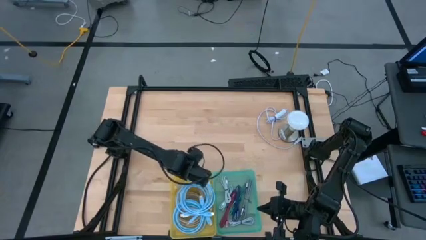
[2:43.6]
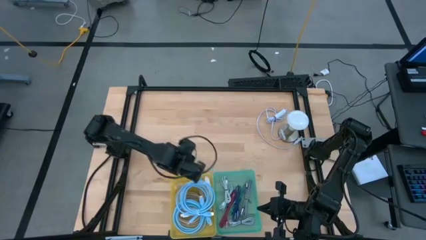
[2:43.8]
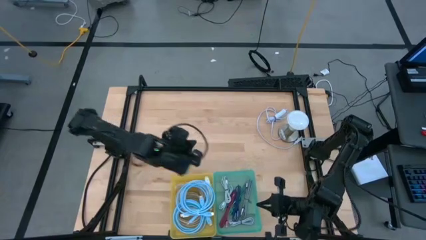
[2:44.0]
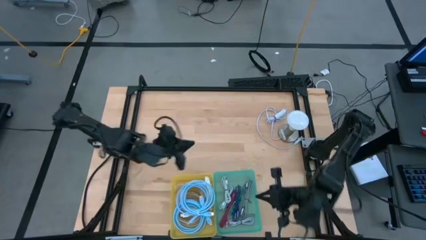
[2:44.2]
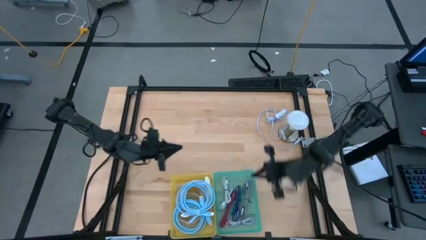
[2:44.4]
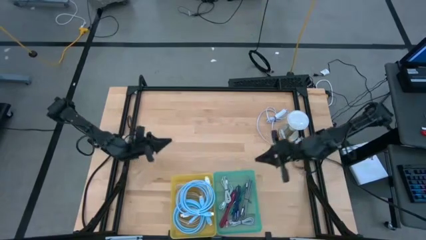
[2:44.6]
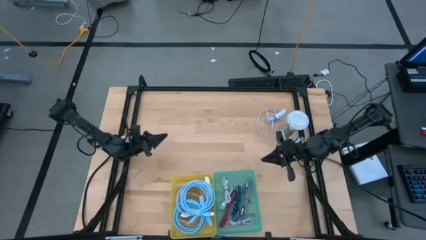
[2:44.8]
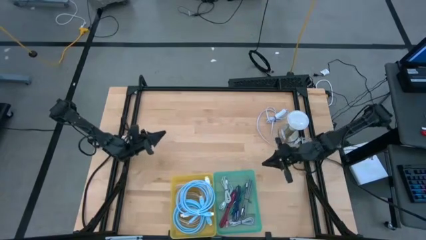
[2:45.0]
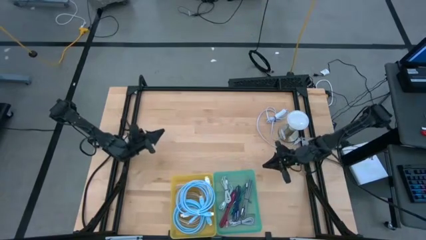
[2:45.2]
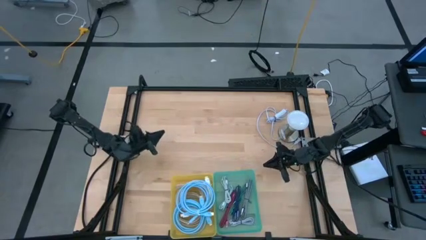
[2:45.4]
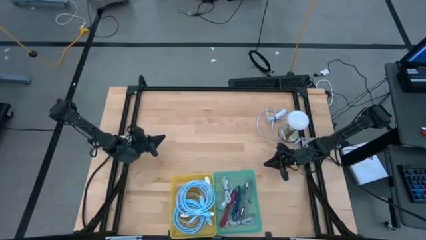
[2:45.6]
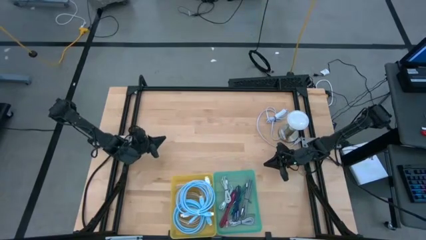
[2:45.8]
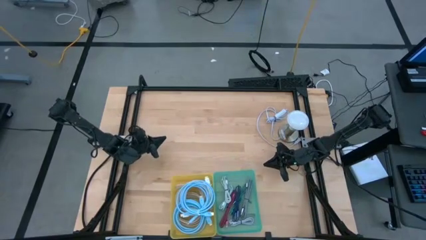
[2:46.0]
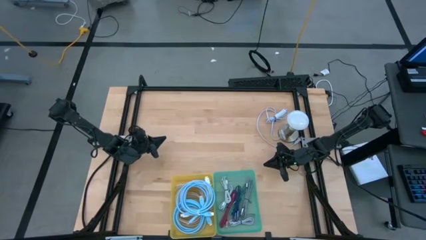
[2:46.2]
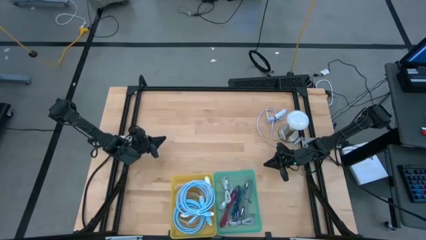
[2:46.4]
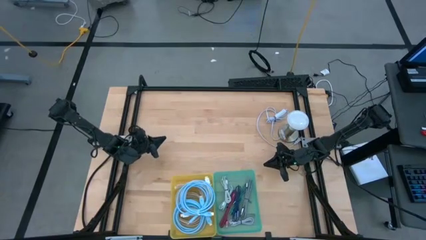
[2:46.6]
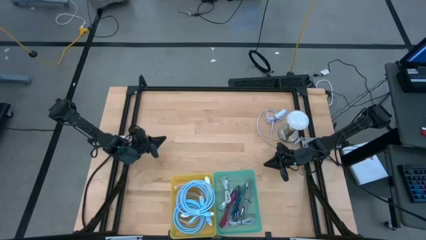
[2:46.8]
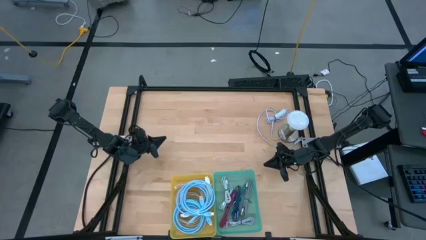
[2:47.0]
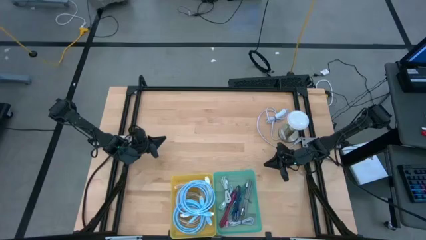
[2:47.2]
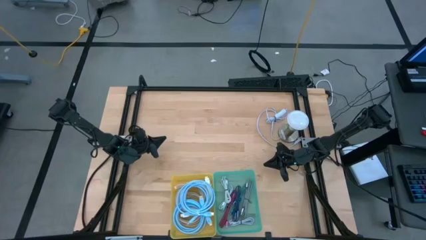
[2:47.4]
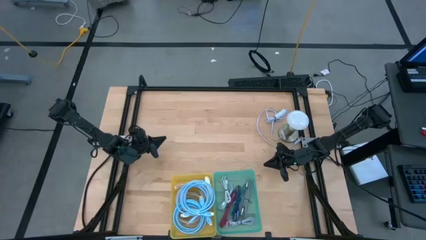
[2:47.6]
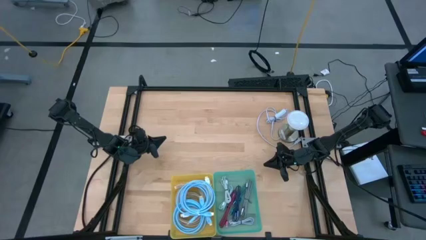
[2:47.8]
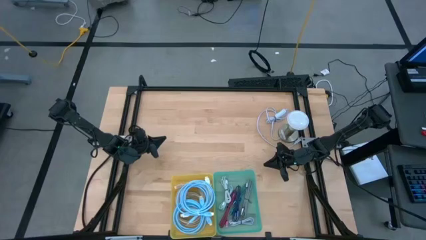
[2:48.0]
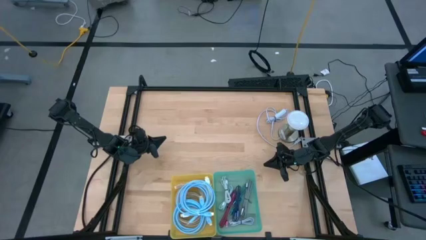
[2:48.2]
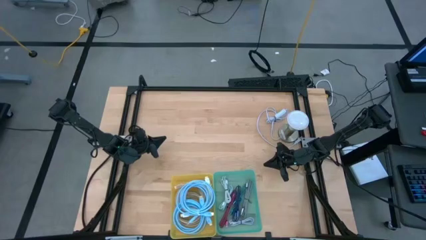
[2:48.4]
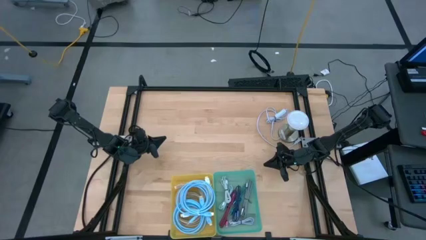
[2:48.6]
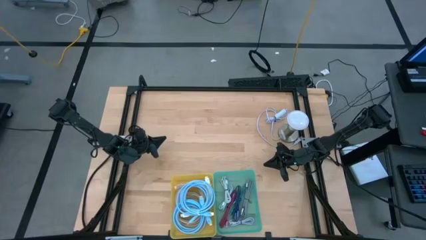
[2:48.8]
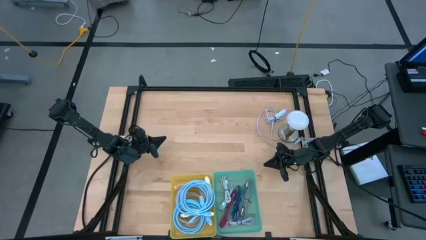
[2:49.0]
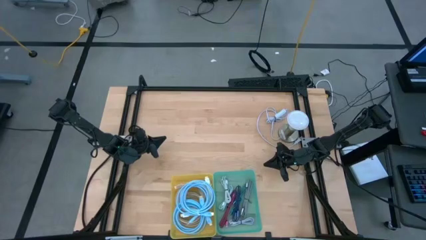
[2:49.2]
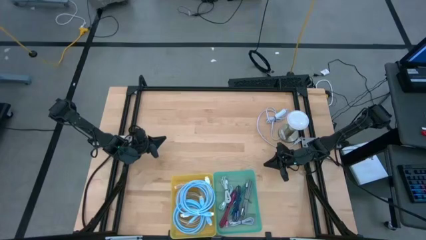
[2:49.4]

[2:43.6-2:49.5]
Task: Pick & Place USB Port
Return to Home Position

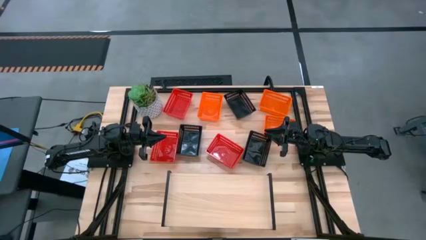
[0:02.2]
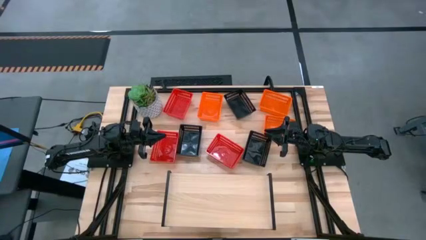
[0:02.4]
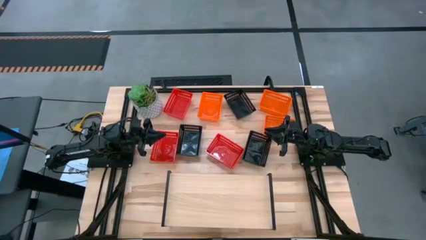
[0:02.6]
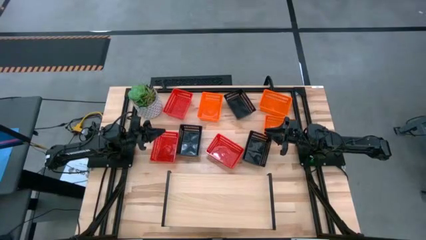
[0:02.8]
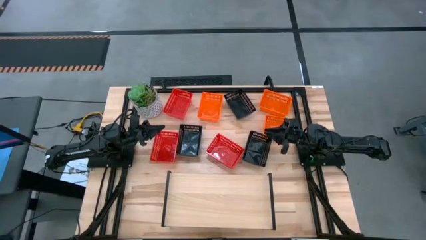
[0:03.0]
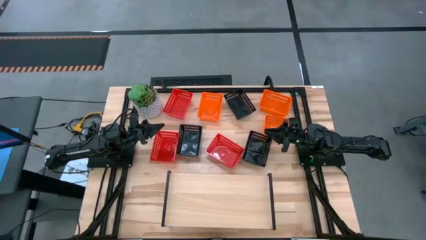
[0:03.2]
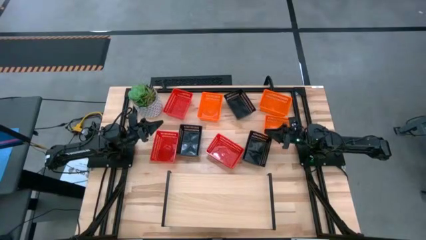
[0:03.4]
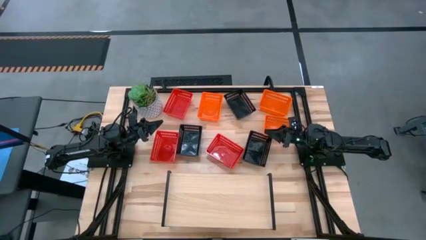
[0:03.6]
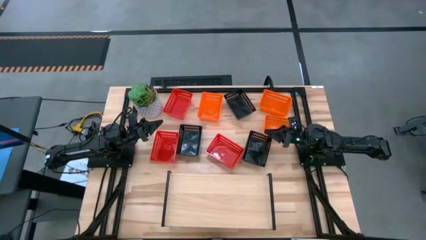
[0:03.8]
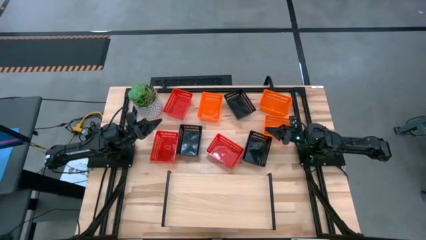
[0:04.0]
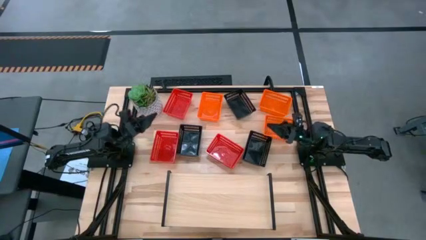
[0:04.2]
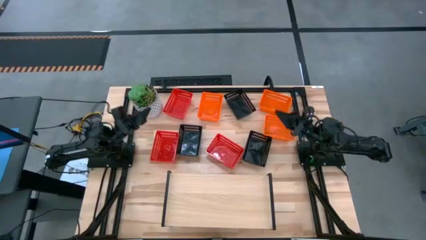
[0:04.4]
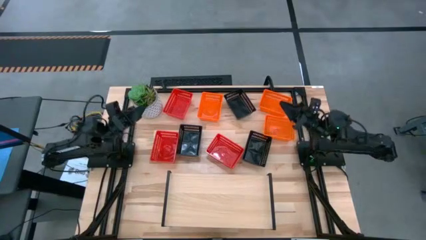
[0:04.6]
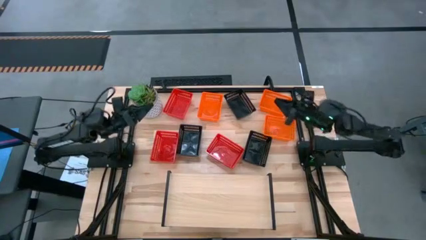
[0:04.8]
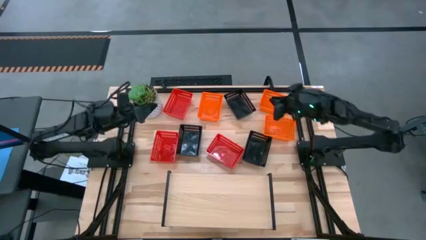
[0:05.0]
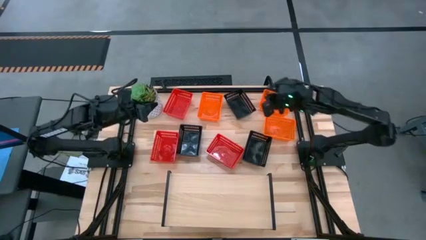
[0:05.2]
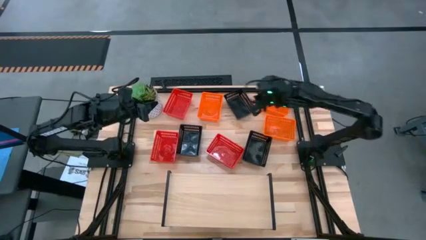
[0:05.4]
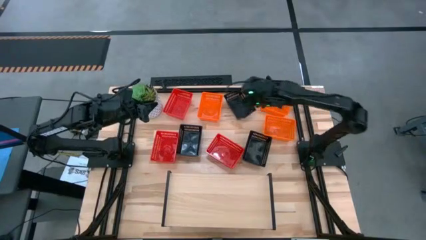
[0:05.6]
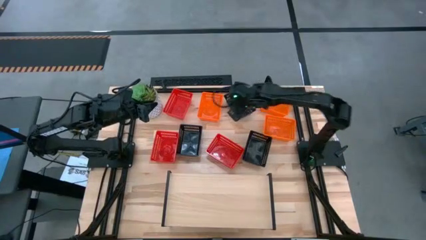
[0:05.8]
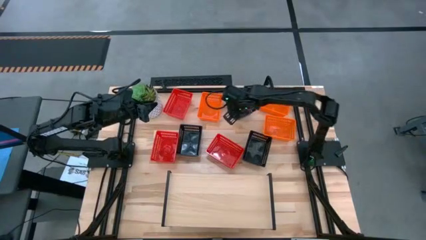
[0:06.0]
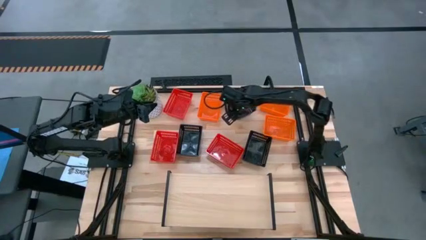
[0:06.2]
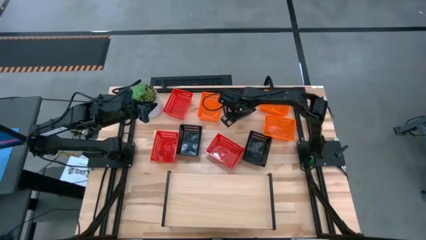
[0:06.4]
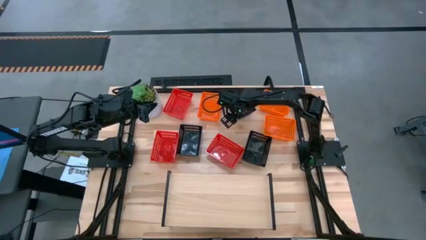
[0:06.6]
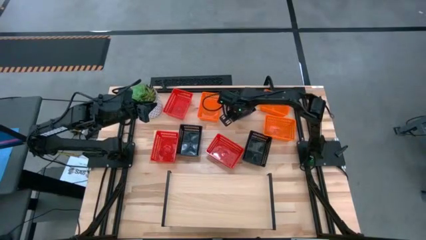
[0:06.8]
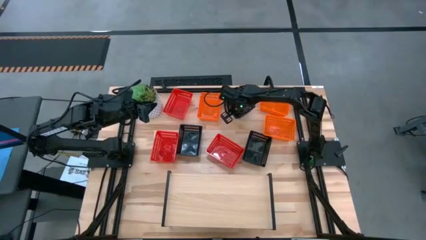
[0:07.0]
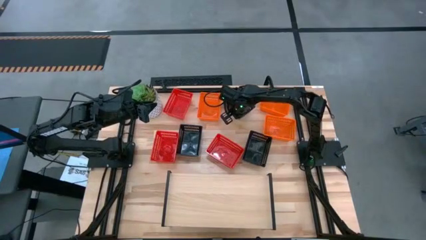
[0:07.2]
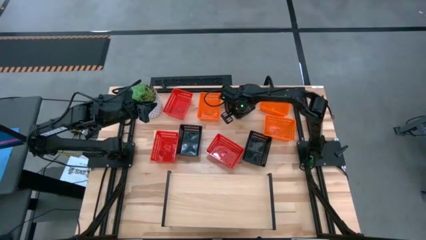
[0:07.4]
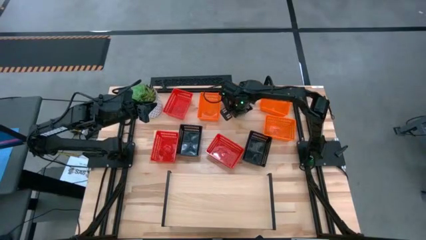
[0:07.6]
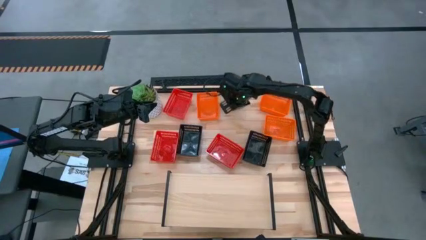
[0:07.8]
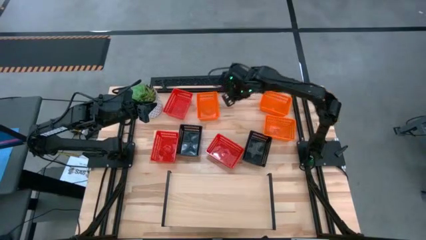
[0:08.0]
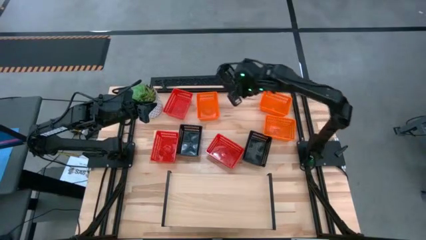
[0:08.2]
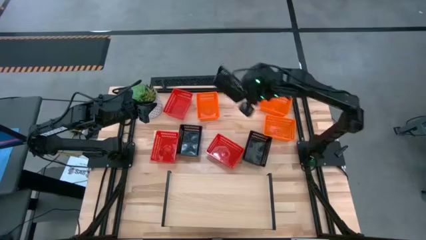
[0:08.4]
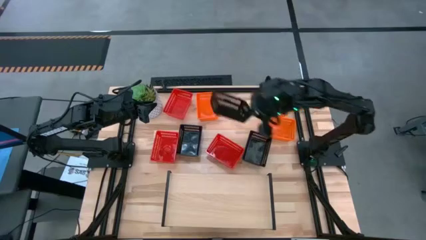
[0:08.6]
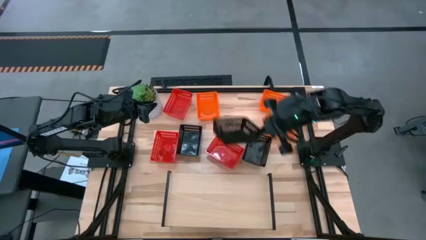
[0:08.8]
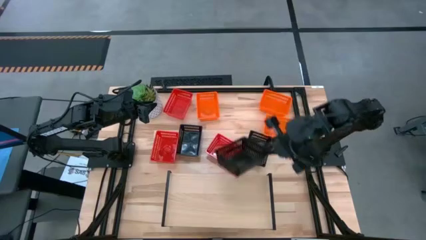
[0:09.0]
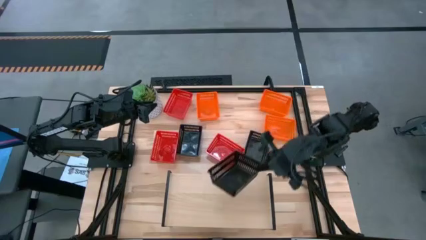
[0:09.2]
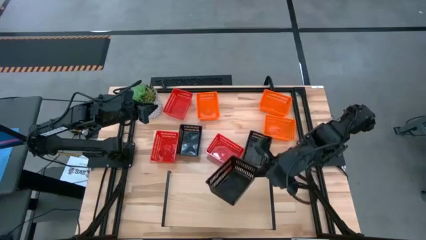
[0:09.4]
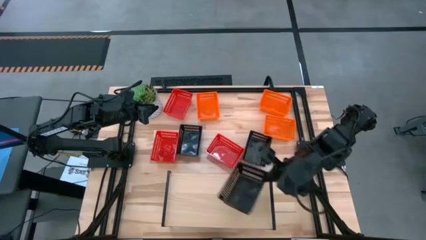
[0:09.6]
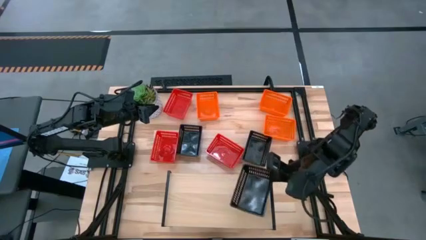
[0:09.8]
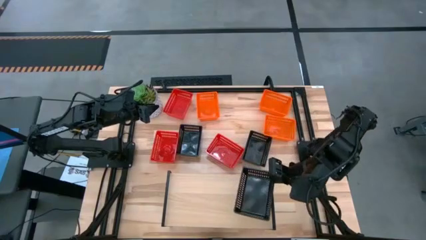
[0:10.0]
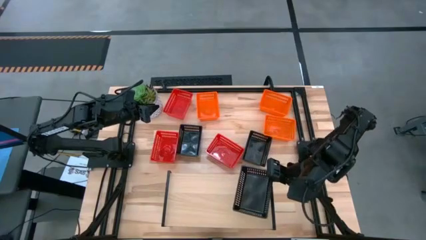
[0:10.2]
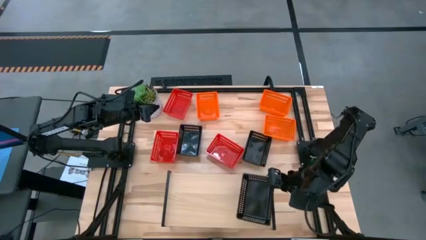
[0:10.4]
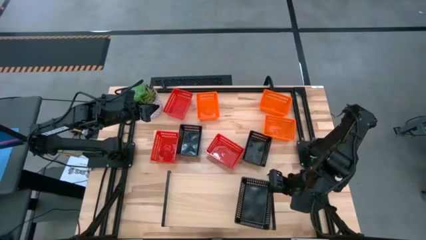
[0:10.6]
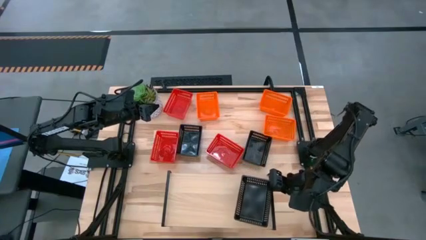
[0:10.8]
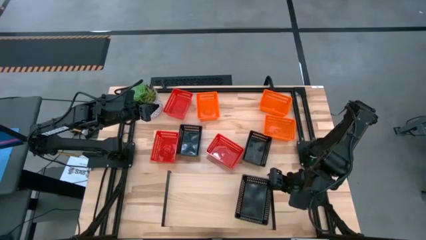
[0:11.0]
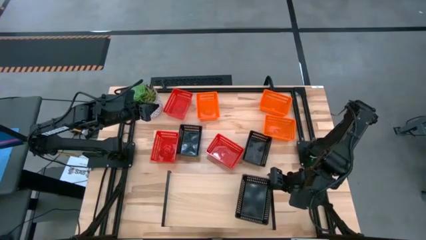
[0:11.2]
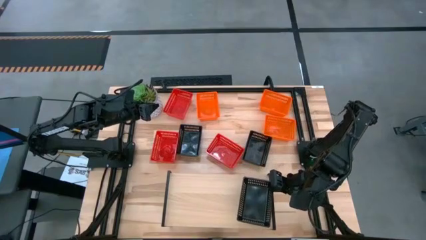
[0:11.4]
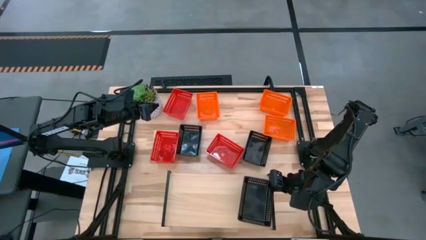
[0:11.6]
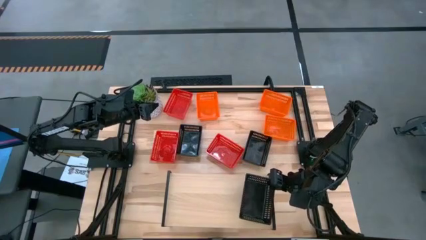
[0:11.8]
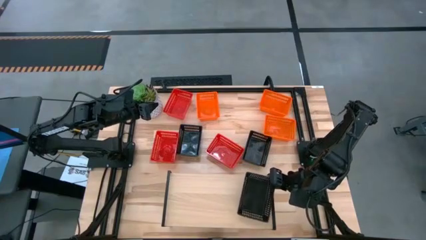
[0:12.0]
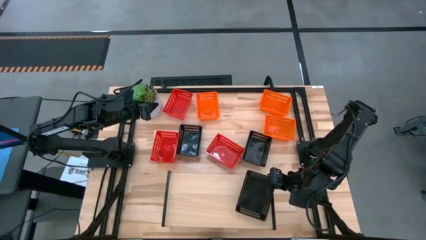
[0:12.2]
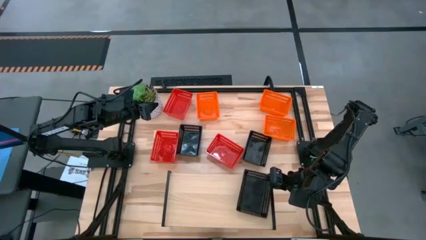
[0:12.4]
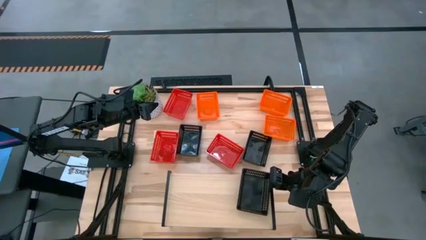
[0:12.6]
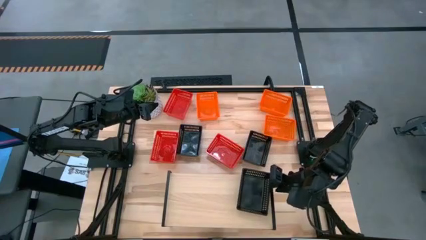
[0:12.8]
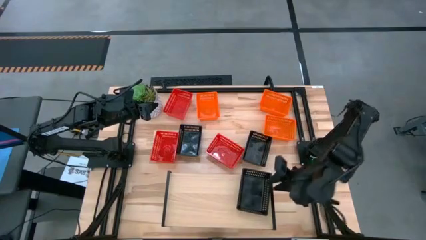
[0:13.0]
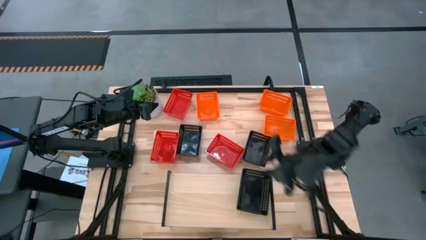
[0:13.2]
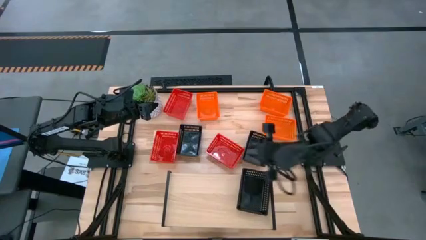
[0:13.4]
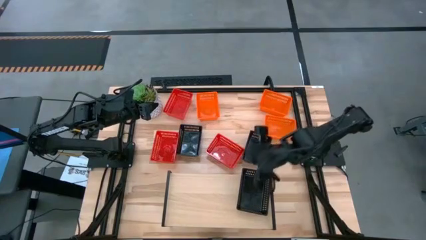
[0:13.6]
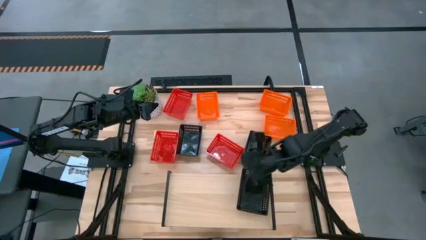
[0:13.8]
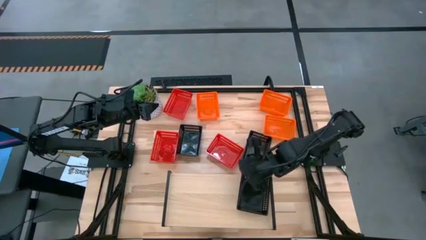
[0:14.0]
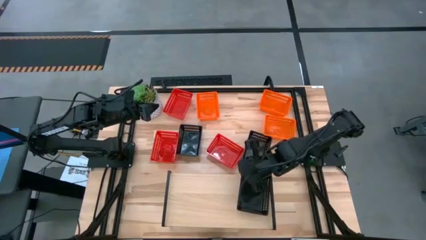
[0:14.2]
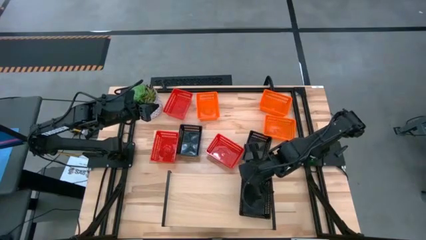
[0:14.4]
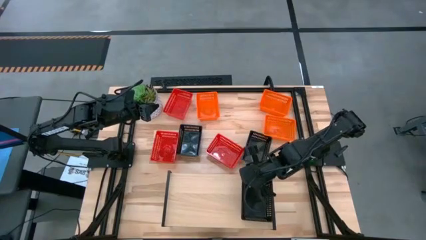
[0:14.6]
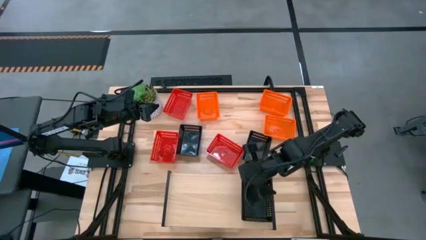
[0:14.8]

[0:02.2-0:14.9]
Task: Stack baskets on shelf by color
Put the top black bin on the shelf
